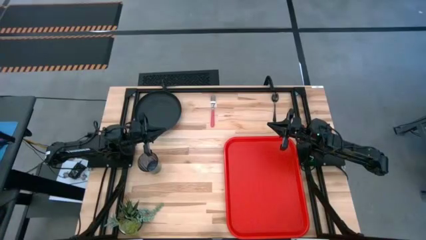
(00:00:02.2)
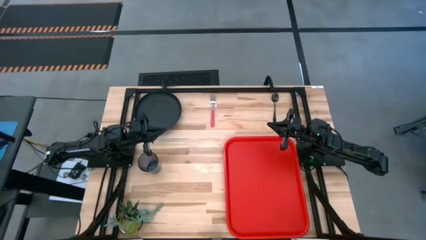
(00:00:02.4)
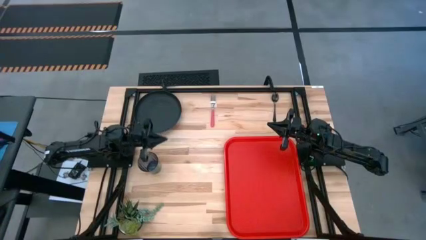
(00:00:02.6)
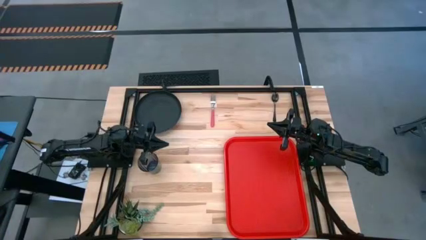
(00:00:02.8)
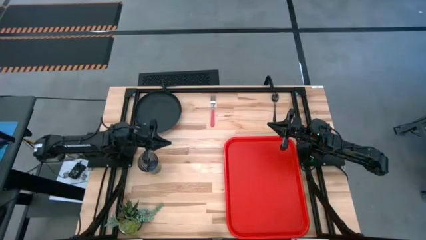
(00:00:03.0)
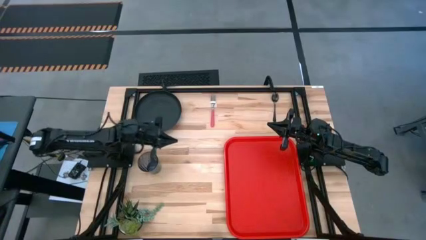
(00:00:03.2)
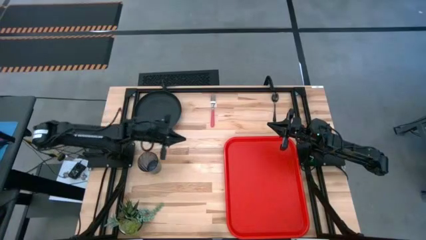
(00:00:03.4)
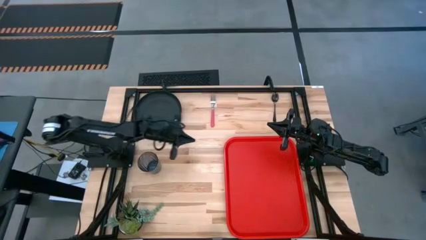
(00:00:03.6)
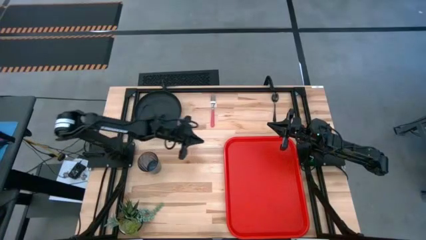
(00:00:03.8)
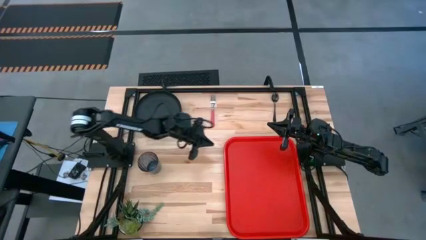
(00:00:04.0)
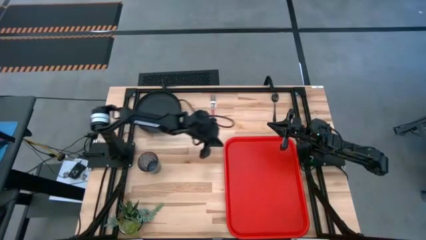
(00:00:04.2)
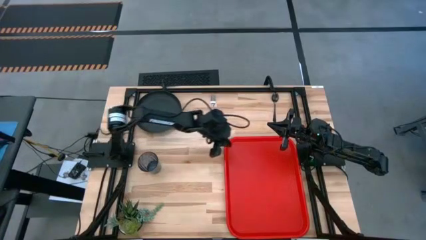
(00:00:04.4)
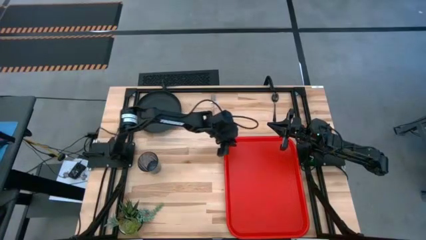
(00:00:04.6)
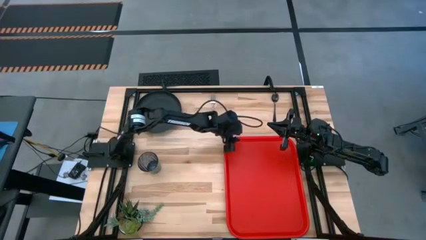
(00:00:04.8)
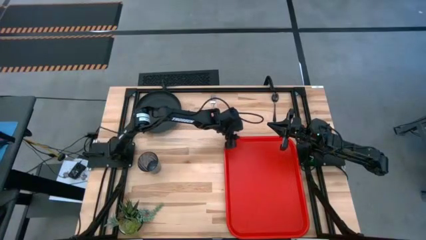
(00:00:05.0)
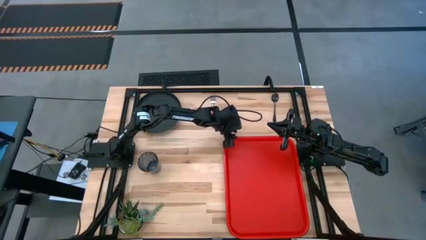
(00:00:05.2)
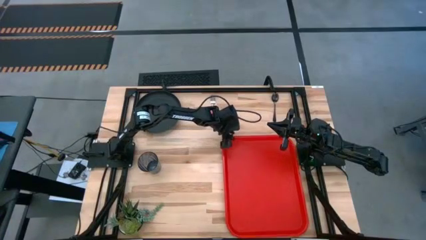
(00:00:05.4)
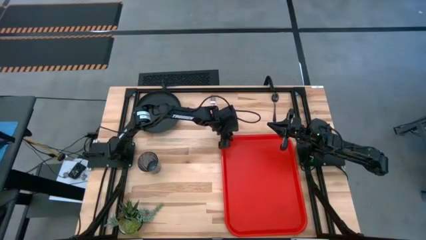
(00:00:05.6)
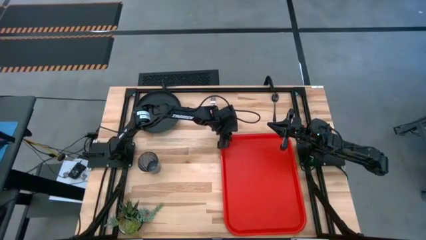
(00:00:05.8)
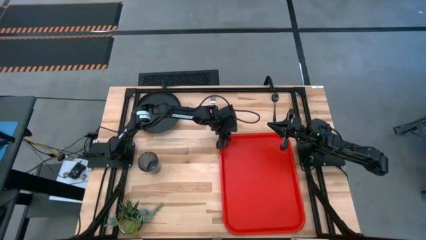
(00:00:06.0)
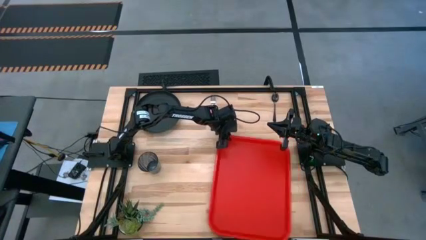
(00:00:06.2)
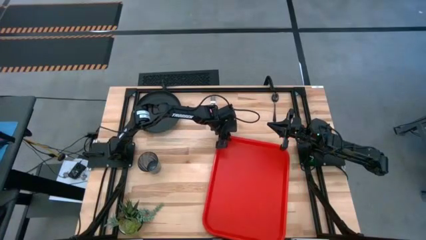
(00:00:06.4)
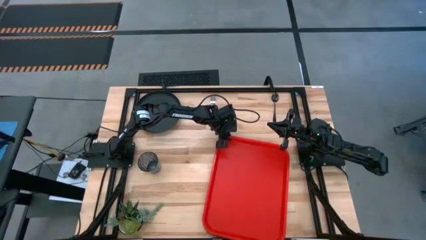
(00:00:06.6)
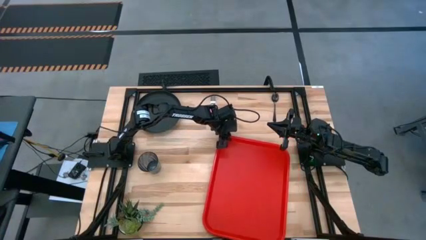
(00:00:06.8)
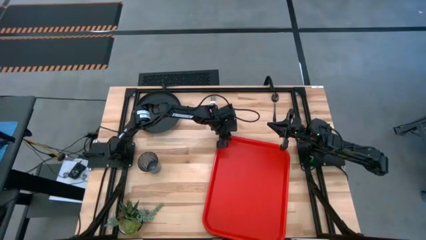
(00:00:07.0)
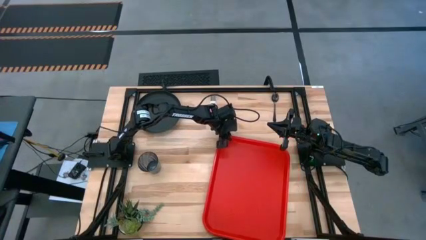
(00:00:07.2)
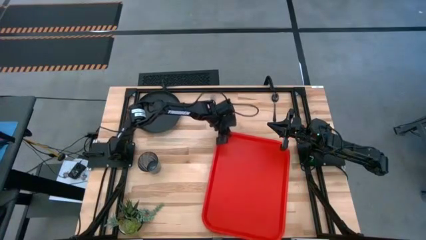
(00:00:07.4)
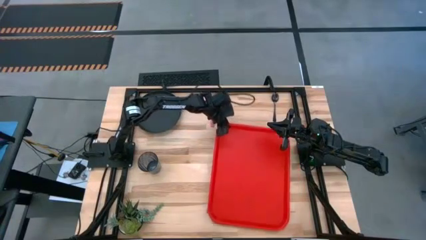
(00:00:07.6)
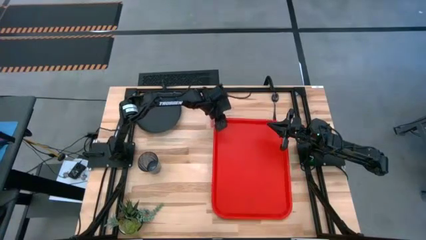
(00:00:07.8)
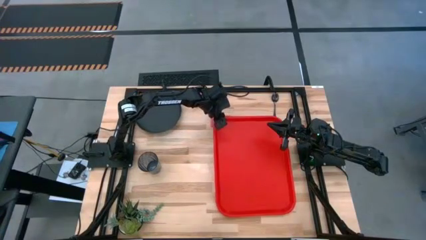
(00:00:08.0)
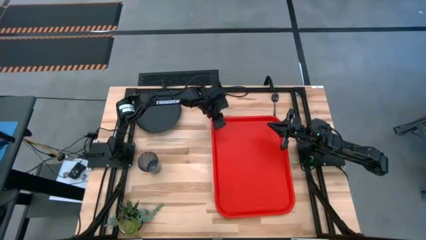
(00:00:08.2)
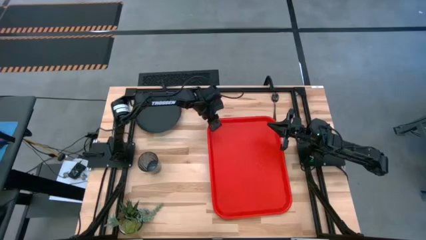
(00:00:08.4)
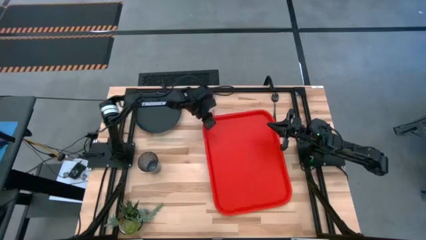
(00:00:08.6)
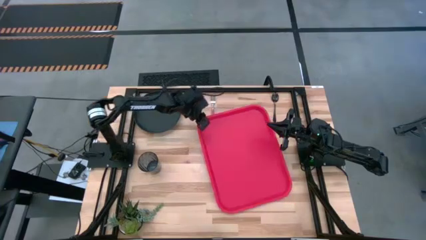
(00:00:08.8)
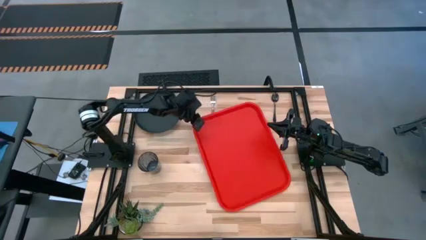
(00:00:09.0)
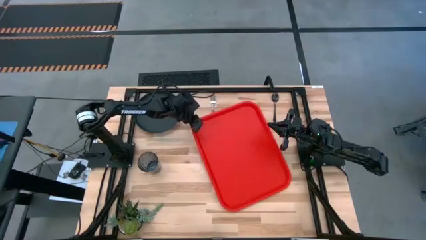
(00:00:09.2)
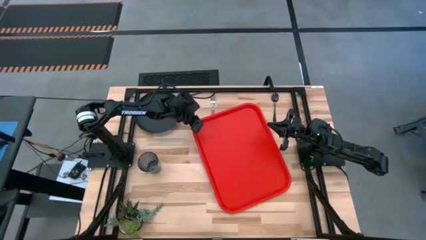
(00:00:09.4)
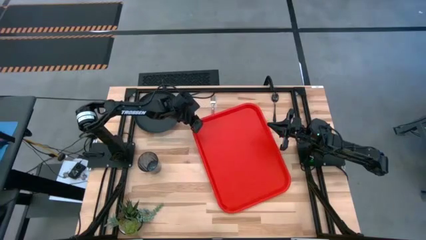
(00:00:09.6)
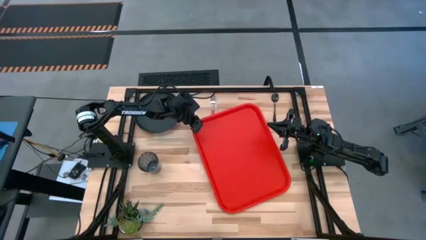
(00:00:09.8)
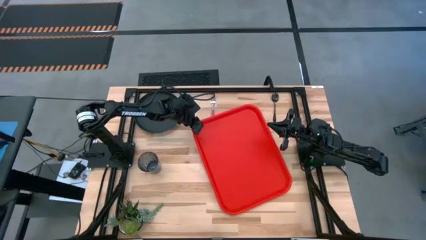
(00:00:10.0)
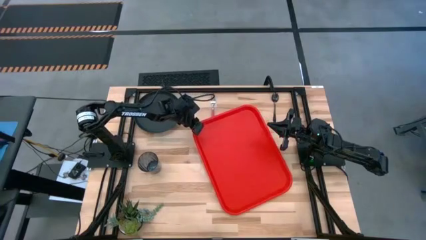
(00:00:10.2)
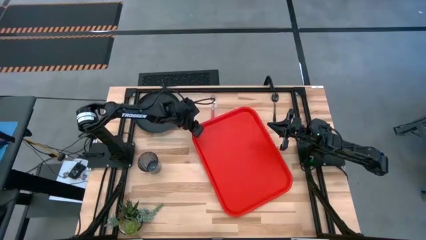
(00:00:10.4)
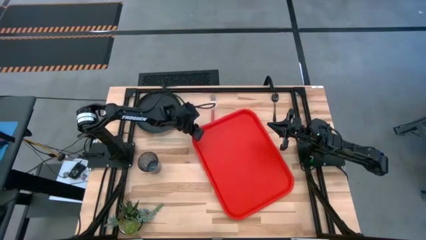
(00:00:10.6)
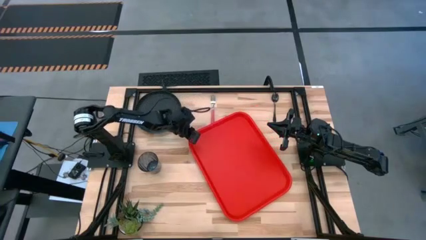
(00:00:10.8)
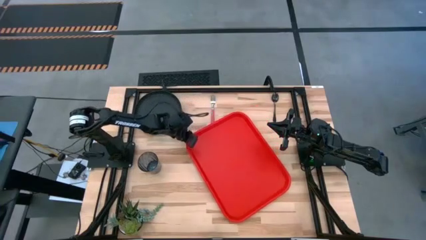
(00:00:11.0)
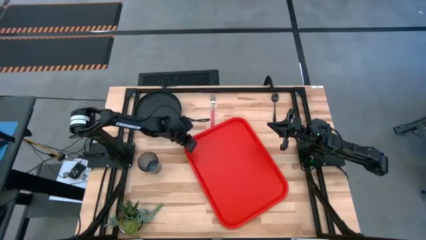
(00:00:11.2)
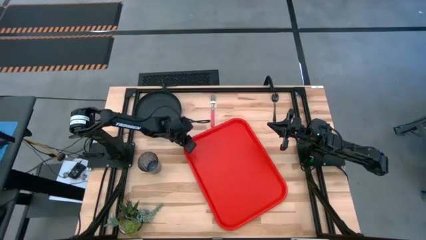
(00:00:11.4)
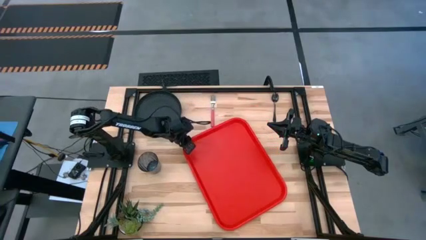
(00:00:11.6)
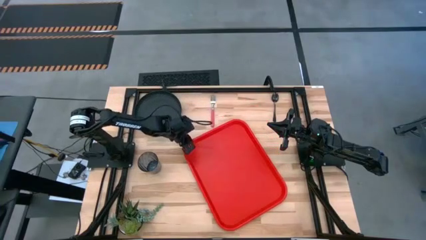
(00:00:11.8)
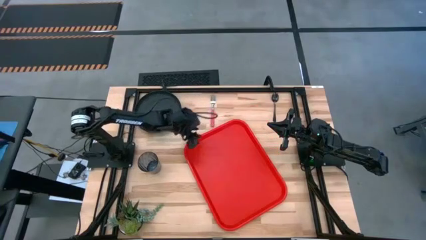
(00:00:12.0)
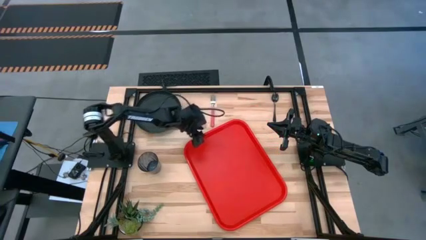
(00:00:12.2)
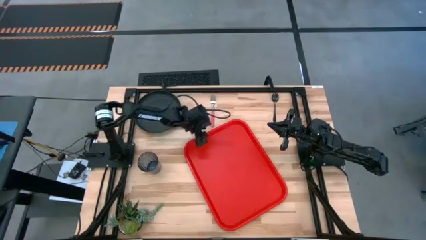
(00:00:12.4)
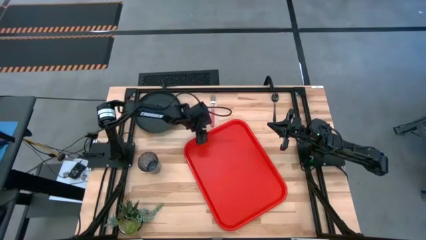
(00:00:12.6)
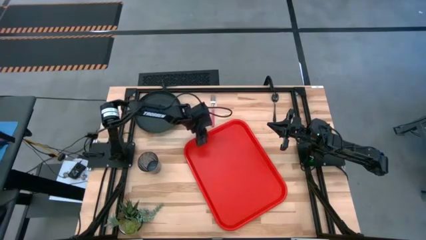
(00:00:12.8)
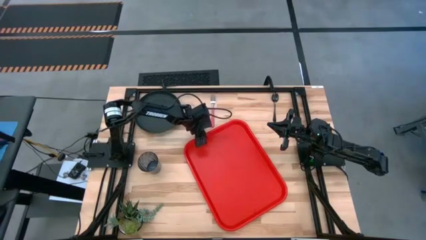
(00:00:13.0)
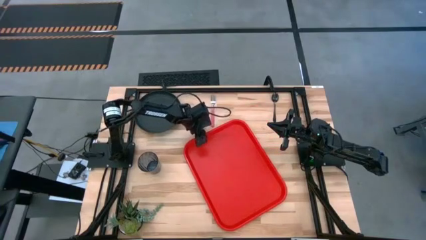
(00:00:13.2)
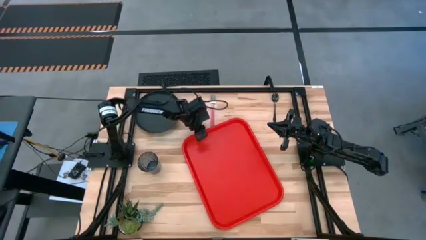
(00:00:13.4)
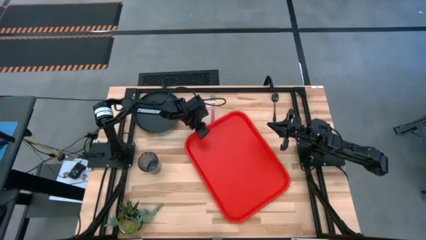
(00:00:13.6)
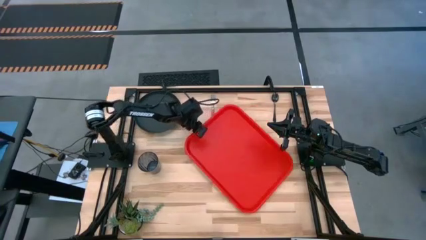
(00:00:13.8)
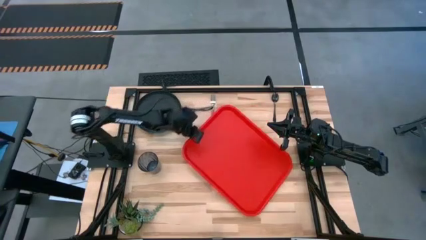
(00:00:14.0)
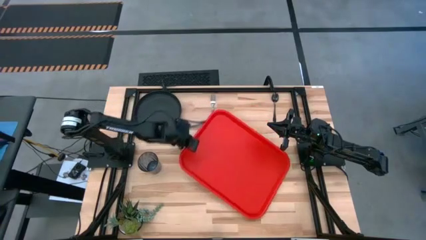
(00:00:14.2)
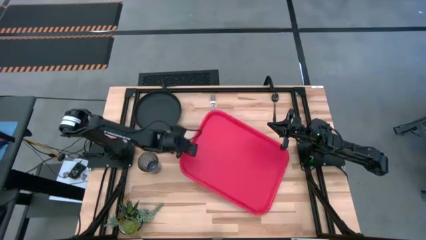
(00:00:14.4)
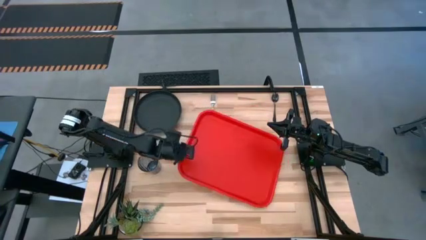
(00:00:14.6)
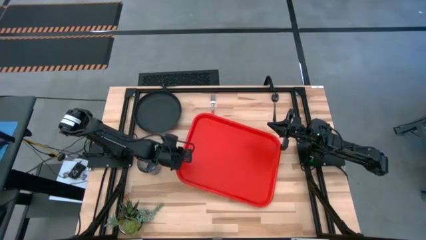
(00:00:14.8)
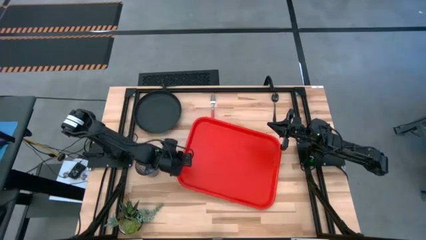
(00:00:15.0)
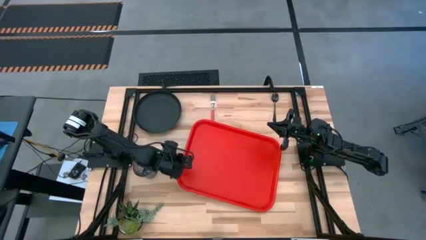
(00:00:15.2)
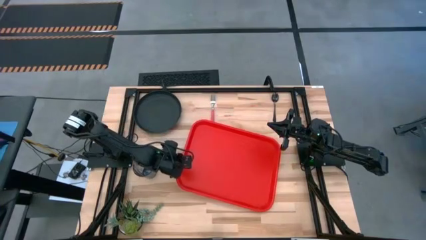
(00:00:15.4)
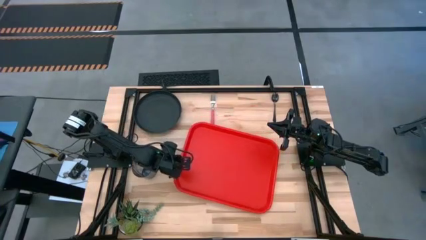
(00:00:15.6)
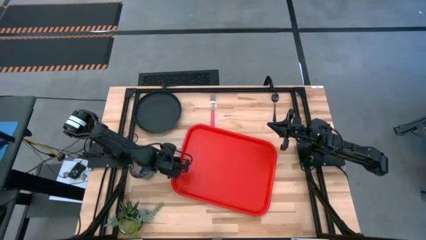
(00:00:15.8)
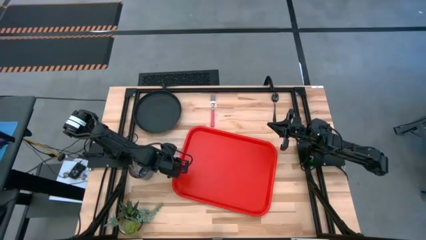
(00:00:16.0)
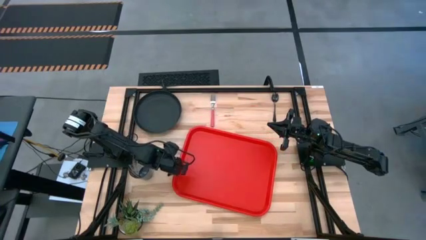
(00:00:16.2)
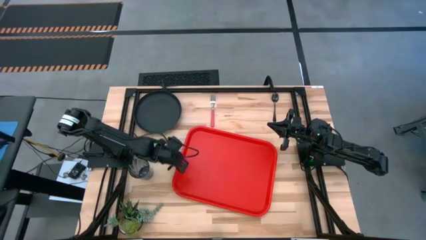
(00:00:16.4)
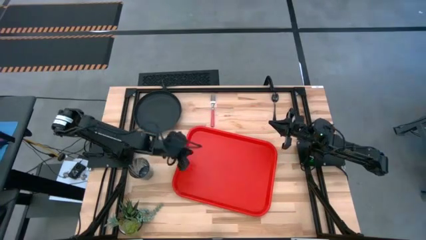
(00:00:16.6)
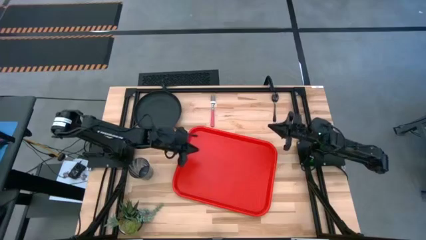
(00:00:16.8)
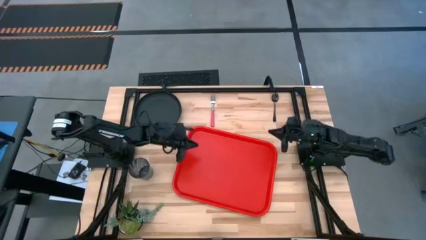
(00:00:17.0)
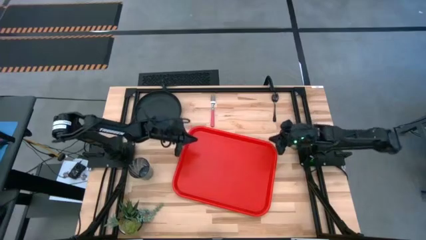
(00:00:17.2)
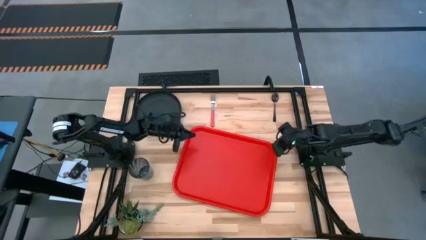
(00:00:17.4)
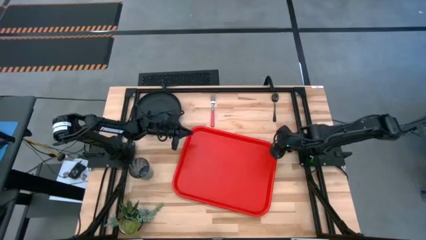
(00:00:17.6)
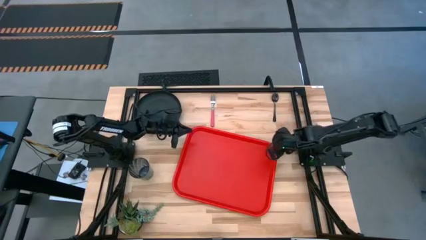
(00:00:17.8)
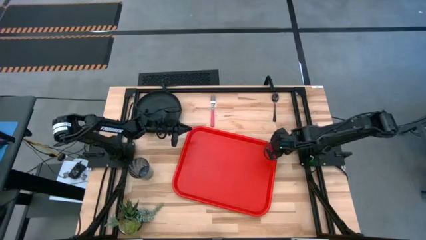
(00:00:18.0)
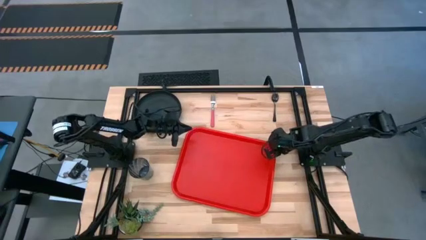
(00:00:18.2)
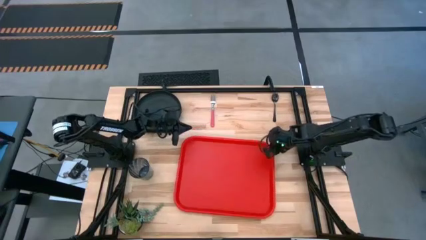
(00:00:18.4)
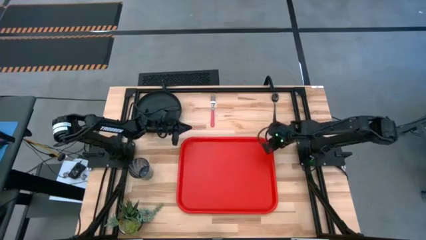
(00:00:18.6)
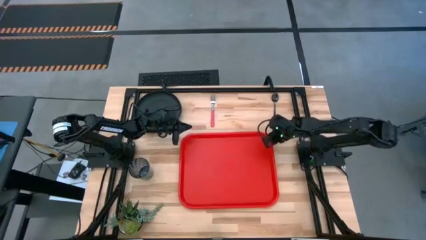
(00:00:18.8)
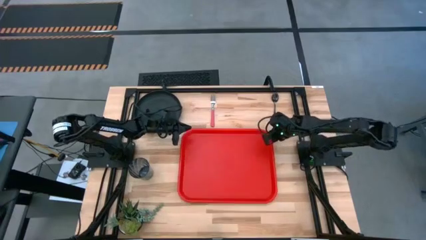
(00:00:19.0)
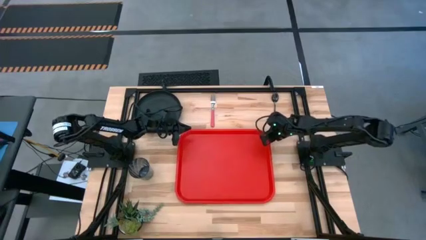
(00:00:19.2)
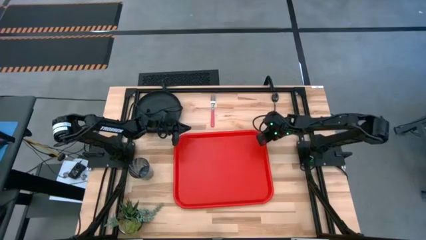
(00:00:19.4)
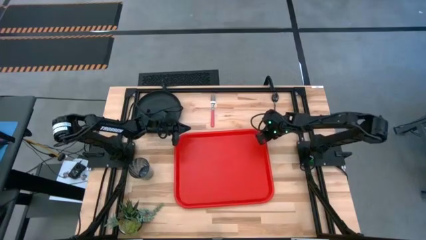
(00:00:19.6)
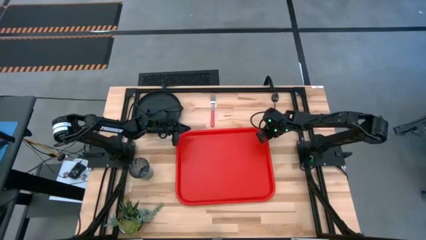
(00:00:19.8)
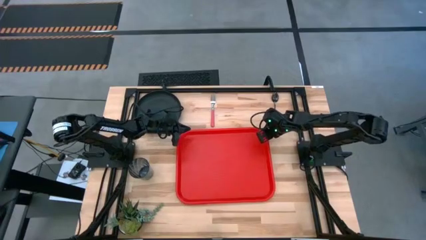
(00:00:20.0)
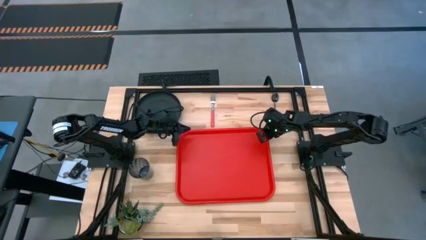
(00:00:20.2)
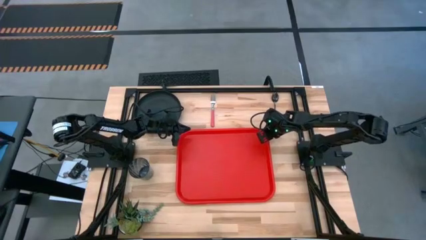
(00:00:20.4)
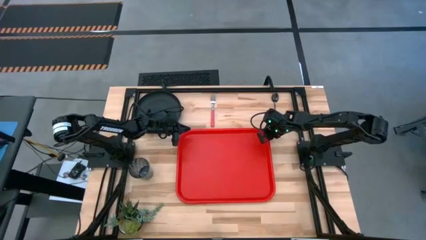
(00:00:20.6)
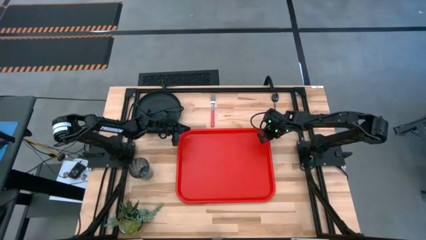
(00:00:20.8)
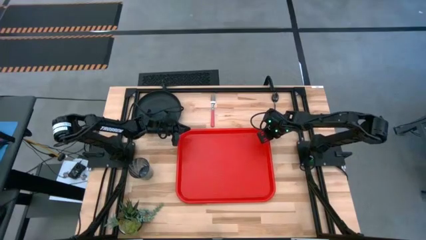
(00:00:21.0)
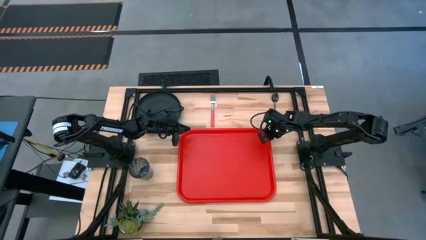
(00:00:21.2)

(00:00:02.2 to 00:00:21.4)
Task: Pick and place plate/cup/fork/spoon on tray
Prepare the red serving tray to the center of the table
